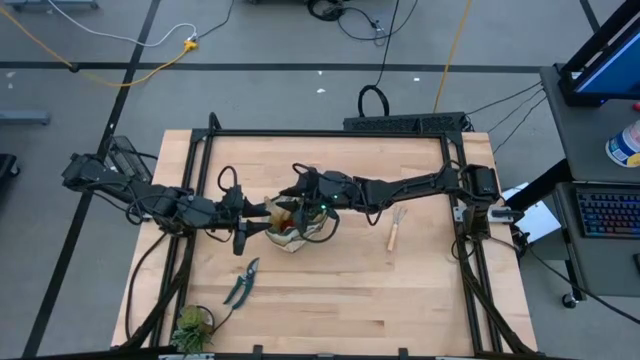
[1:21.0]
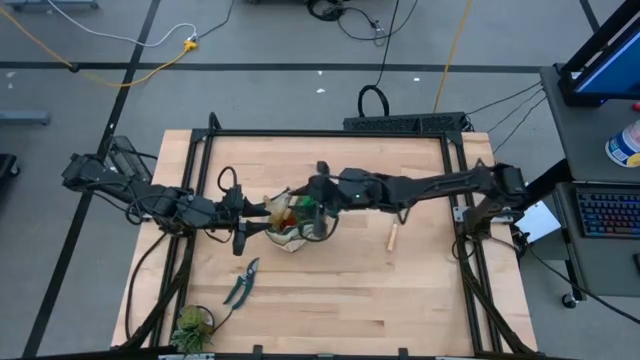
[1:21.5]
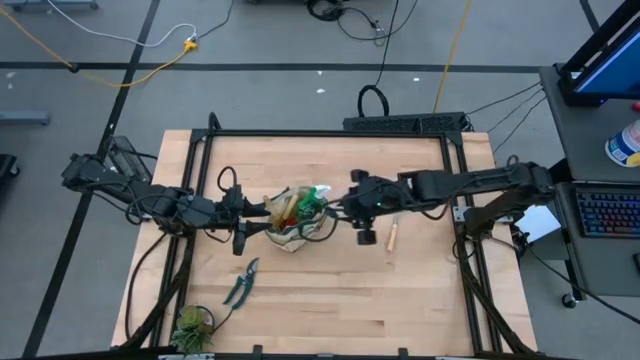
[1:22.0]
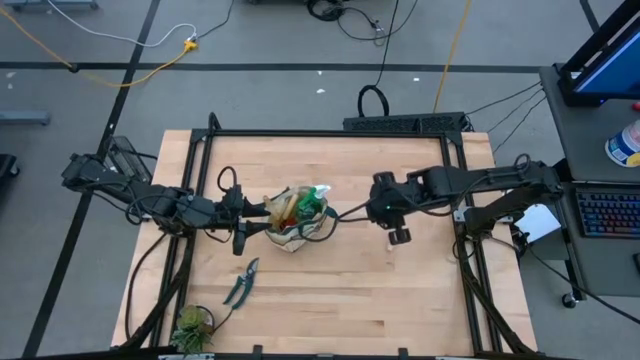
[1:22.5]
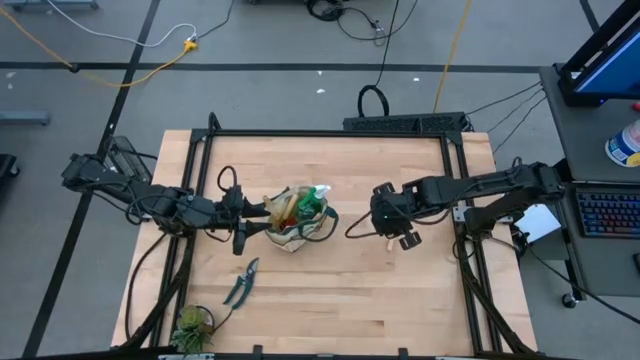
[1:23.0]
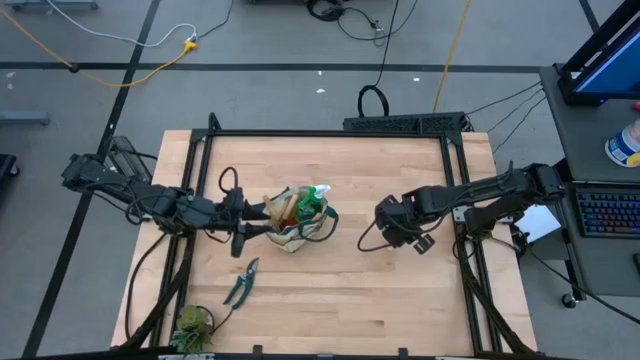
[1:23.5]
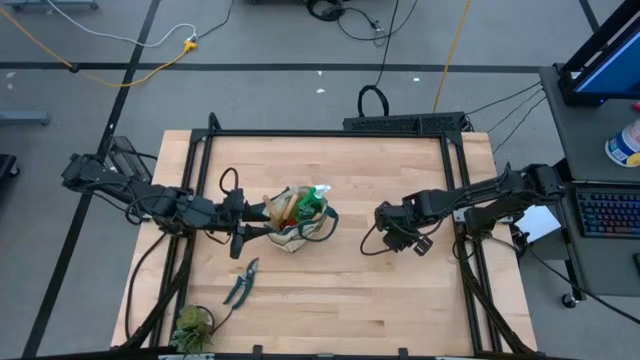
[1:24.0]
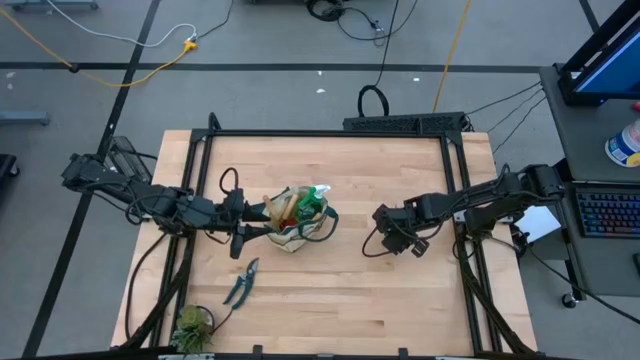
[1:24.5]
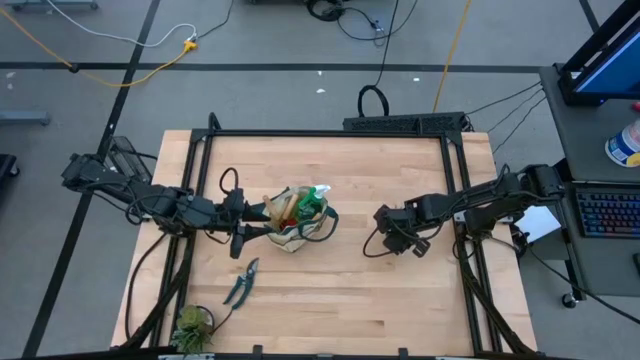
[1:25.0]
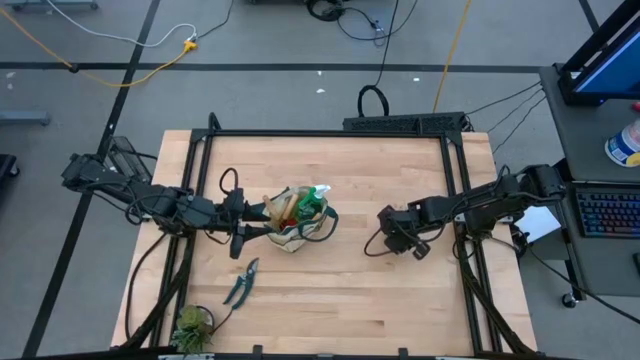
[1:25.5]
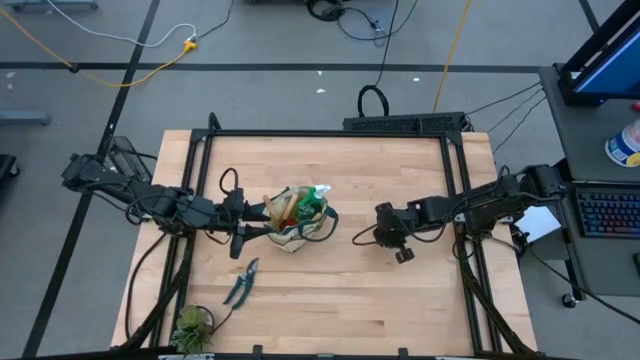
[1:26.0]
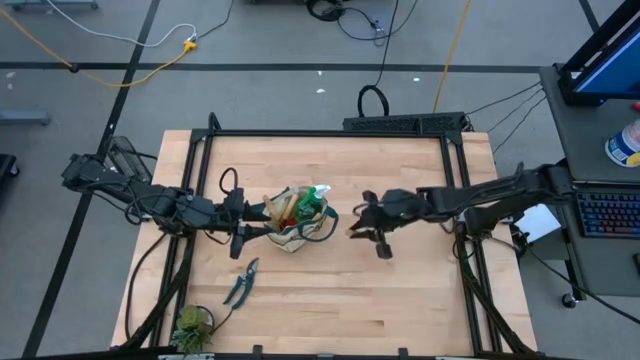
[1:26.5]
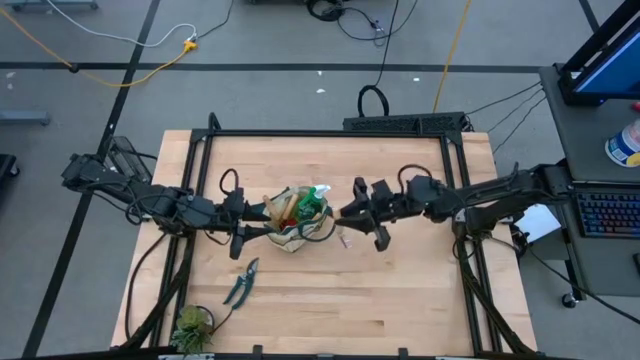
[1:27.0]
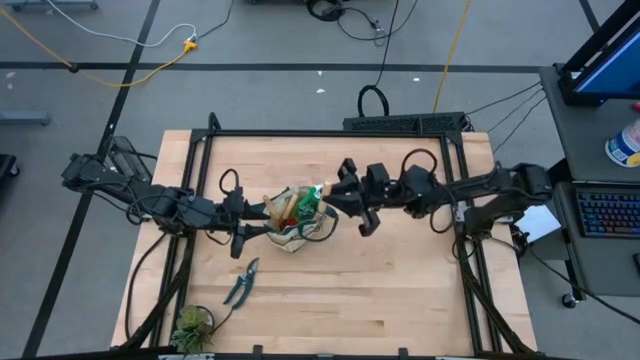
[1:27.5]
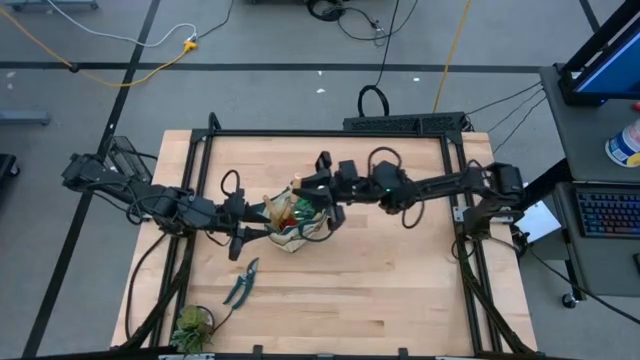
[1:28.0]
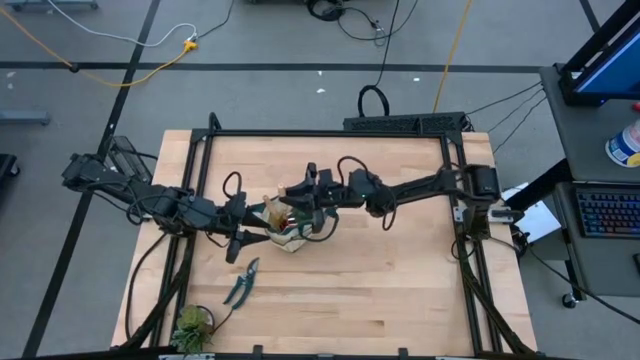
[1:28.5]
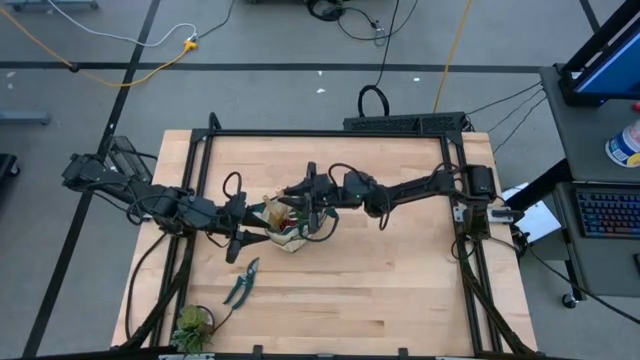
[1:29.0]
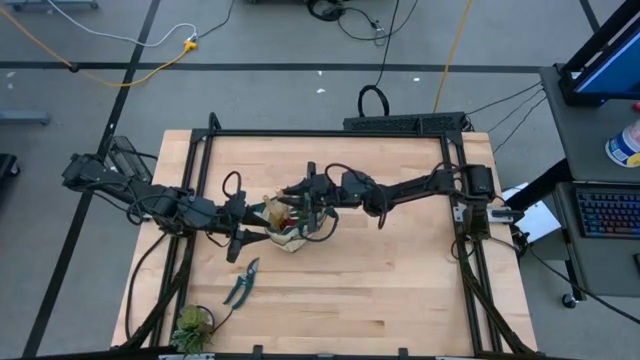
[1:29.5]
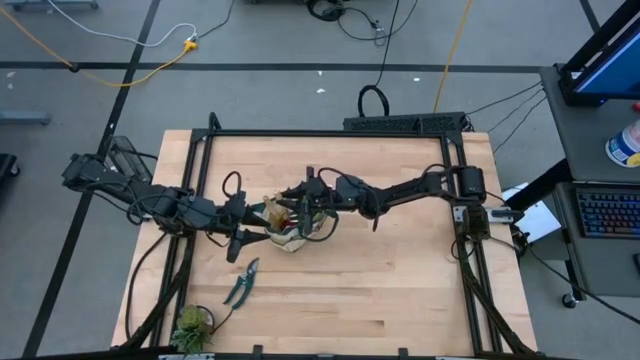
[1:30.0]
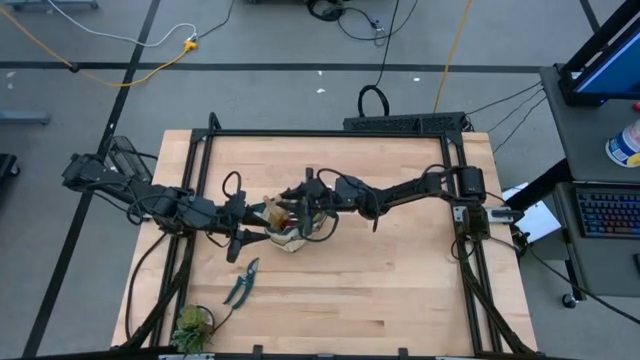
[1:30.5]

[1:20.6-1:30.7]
Task: Pick & Place Garden tools in Gardening bag
Put the hand rake into the gardening bag

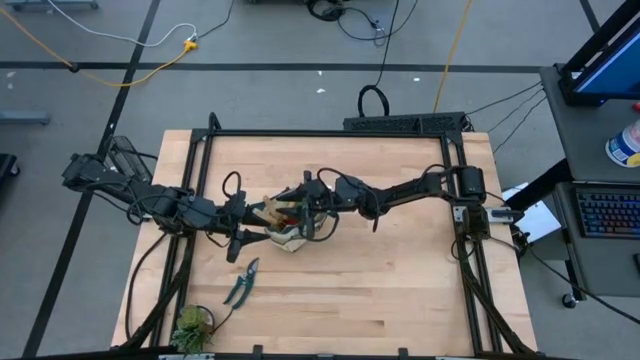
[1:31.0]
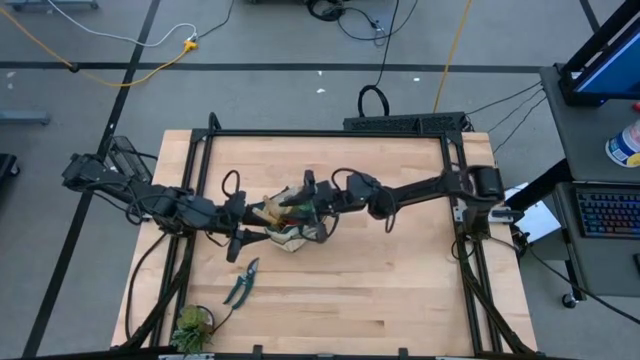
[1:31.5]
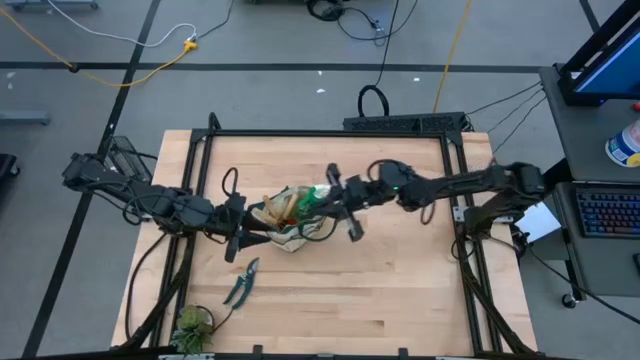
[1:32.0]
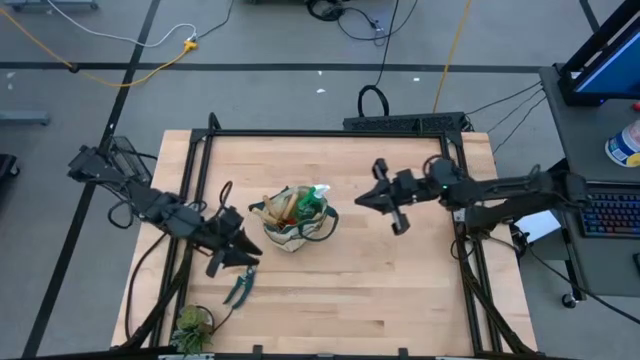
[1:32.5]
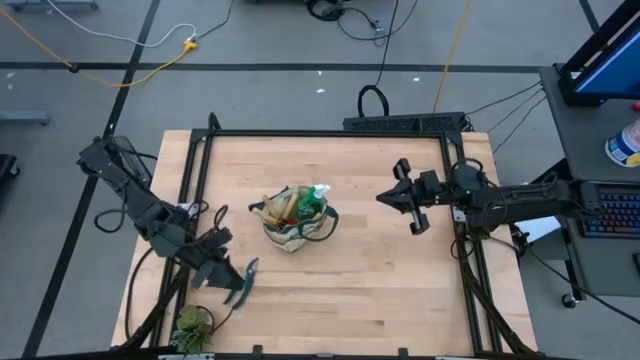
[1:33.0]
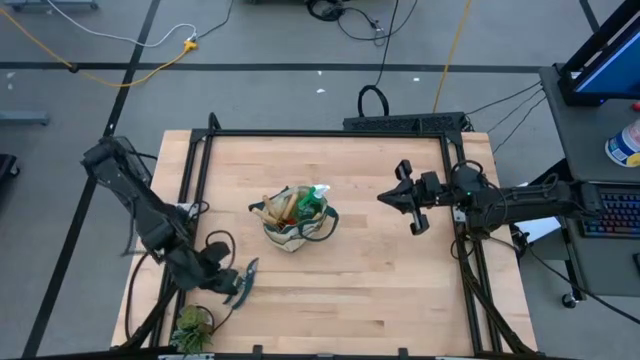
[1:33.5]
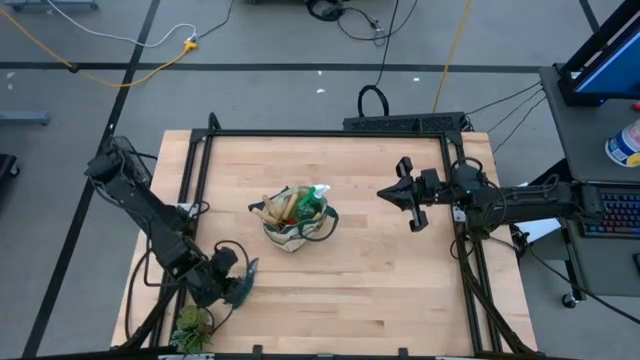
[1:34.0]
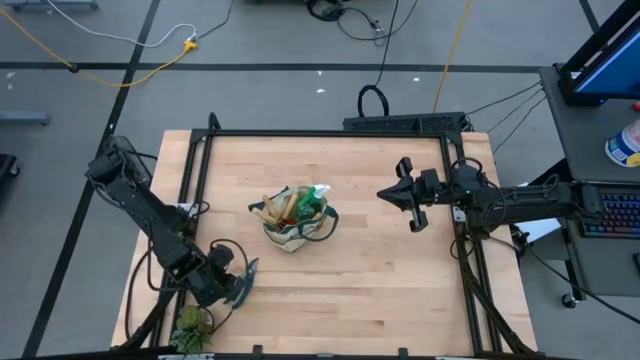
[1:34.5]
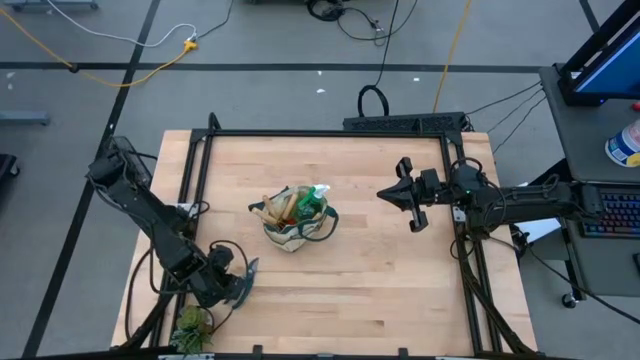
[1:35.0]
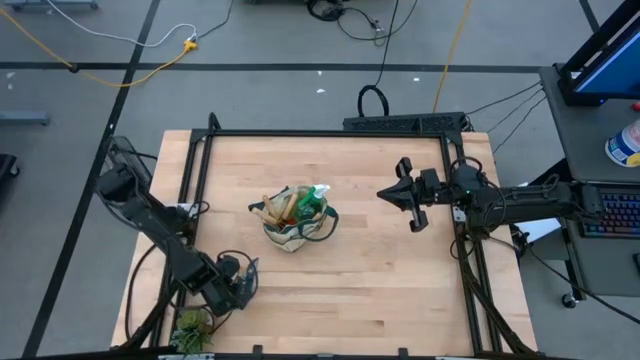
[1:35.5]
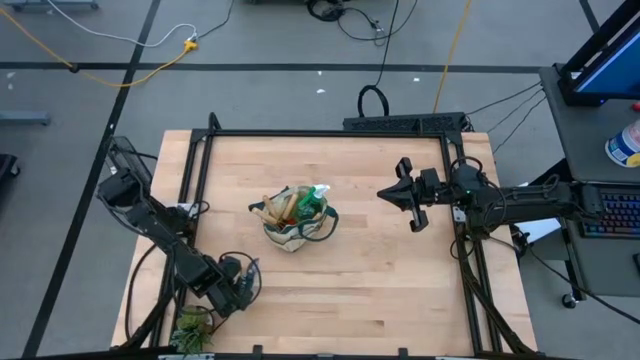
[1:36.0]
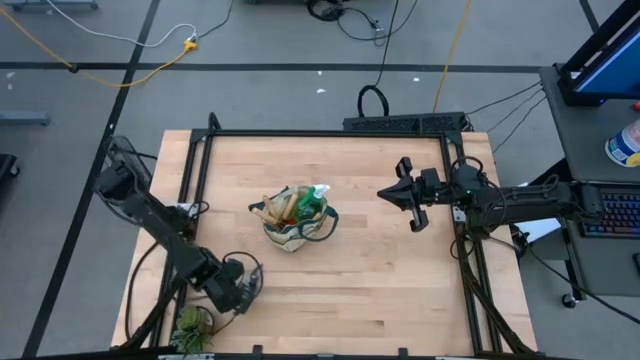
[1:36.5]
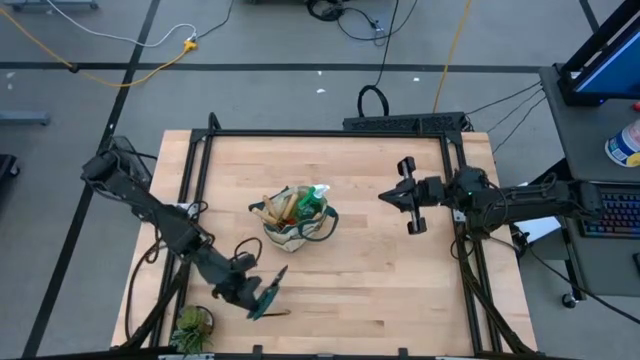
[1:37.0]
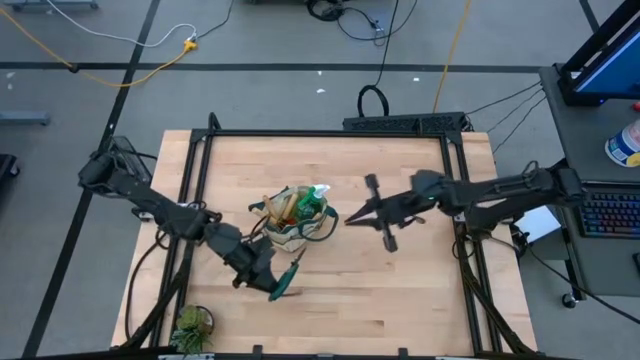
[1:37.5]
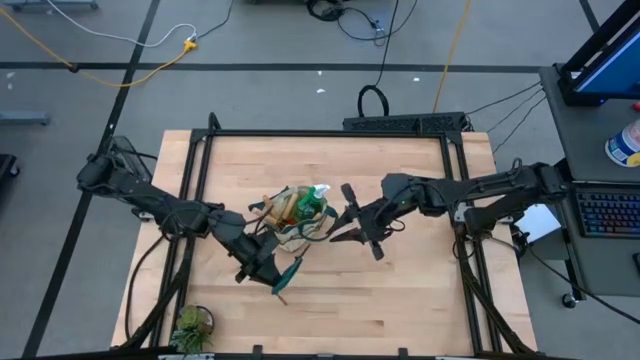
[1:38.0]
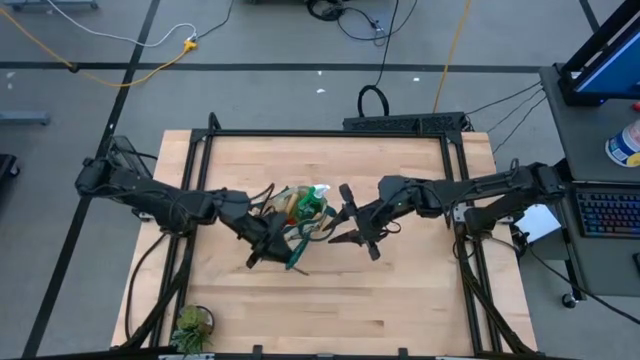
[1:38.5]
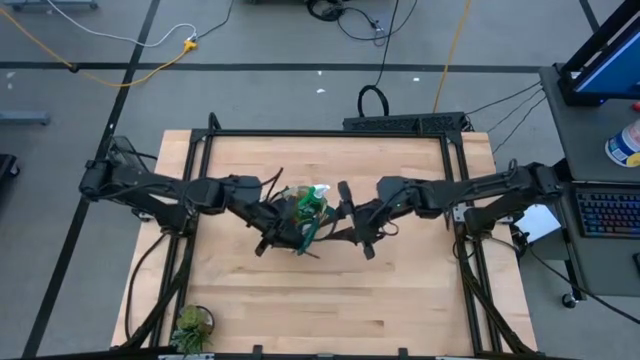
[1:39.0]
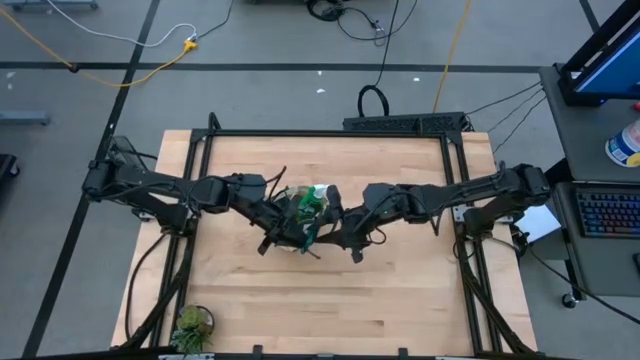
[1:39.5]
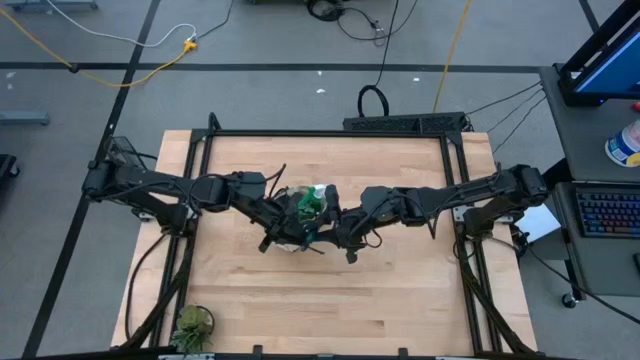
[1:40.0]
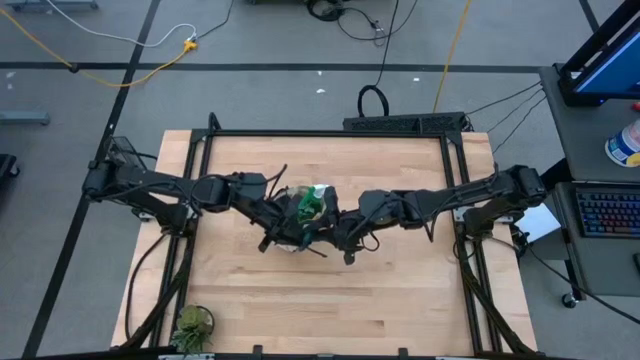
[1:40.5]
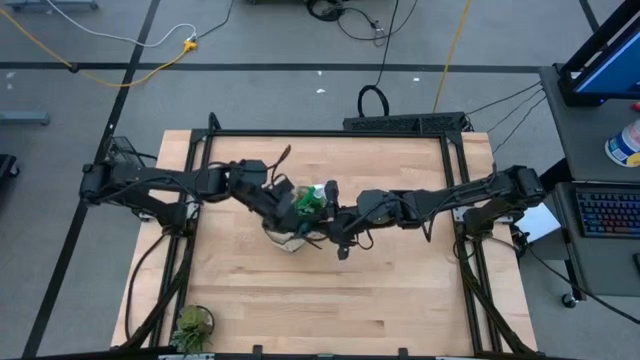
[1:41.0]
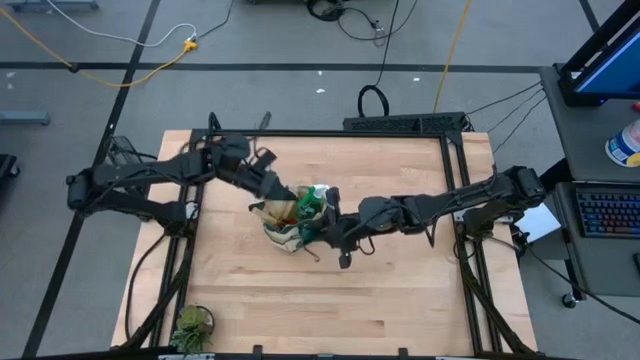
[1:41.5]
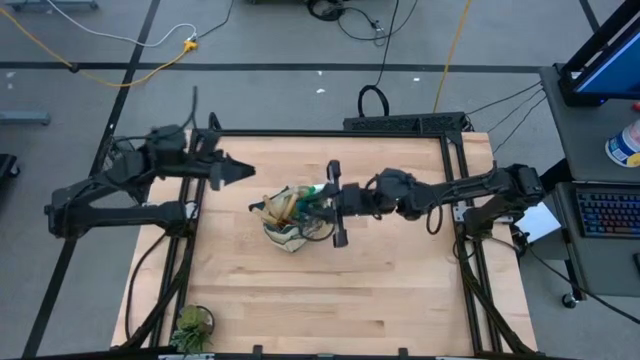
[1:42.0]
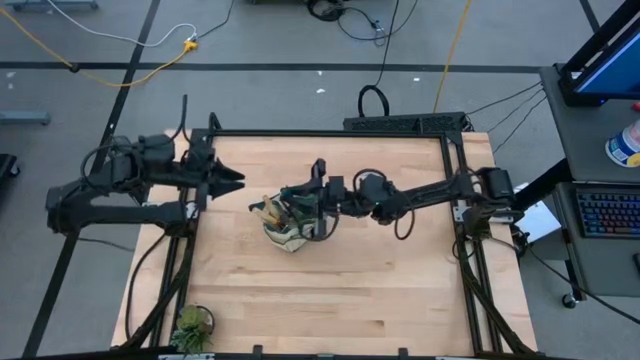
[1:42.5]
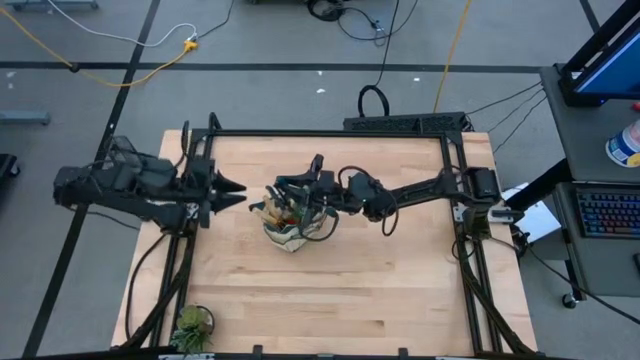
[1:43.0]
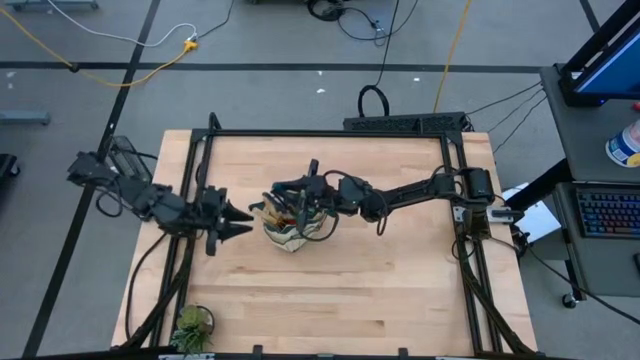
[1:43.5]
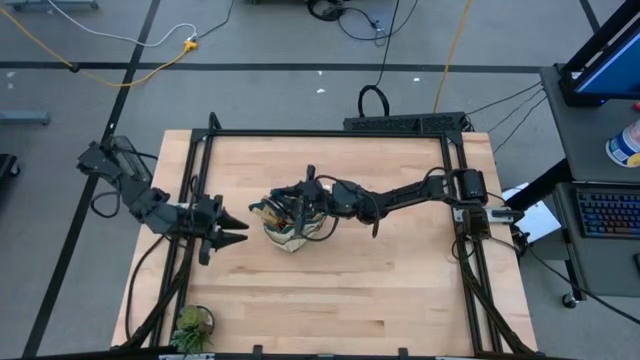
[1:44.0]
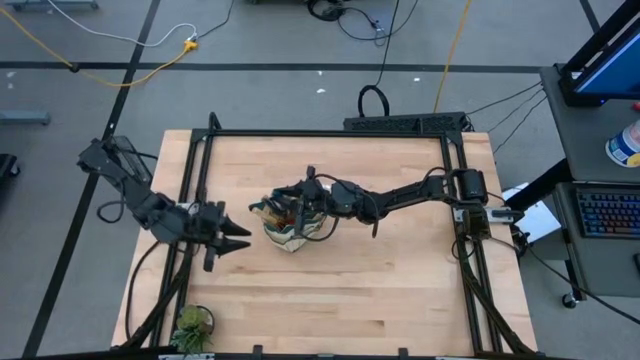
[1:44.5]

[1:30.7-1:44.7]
Put the shear scissors into the gardening bag
